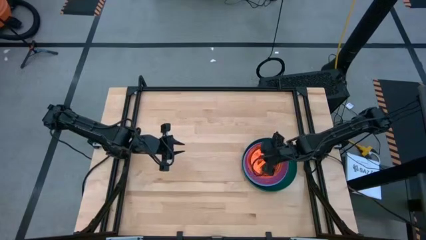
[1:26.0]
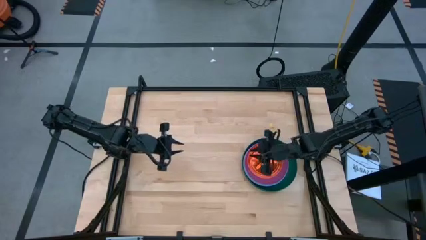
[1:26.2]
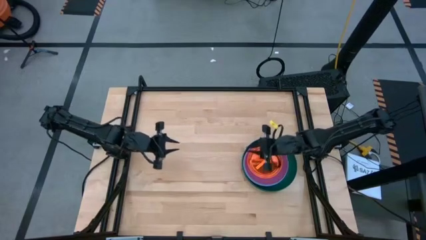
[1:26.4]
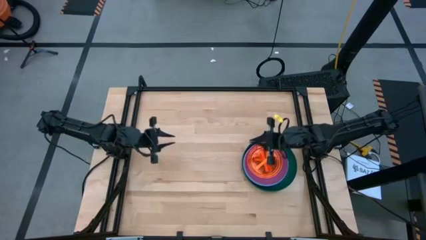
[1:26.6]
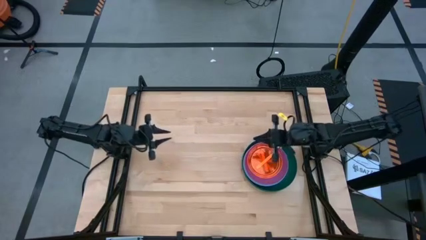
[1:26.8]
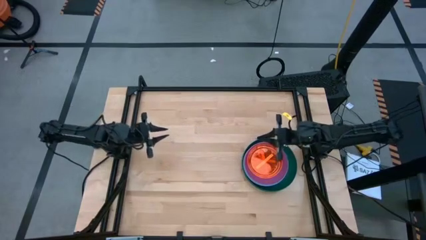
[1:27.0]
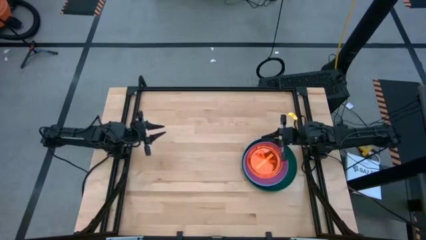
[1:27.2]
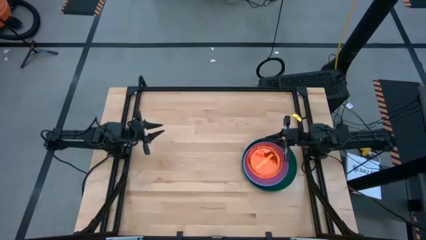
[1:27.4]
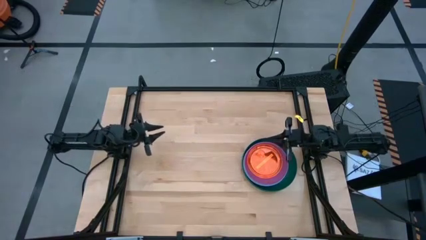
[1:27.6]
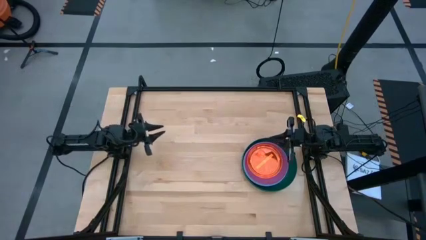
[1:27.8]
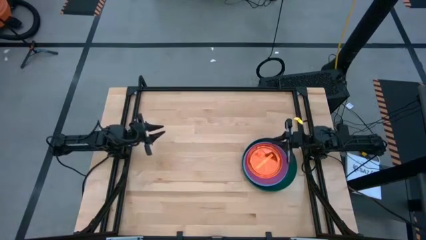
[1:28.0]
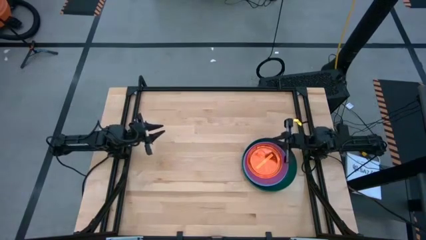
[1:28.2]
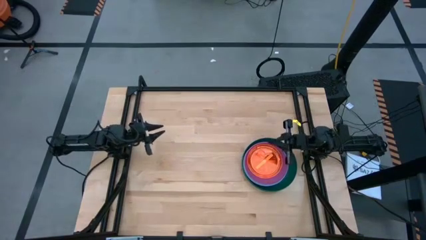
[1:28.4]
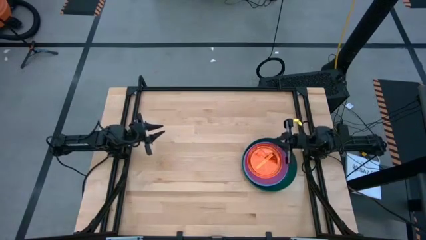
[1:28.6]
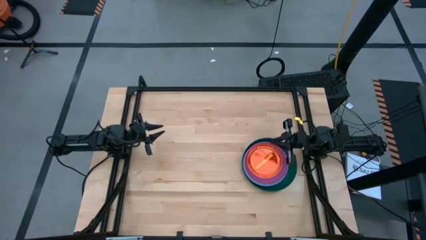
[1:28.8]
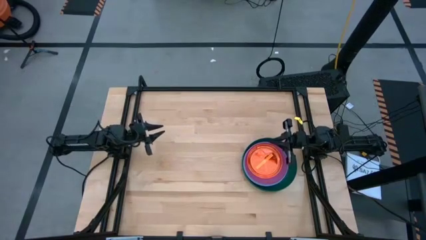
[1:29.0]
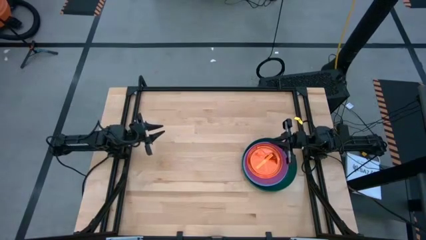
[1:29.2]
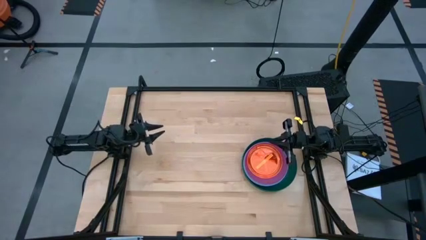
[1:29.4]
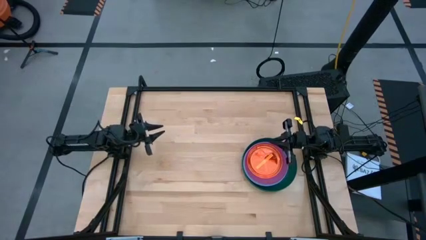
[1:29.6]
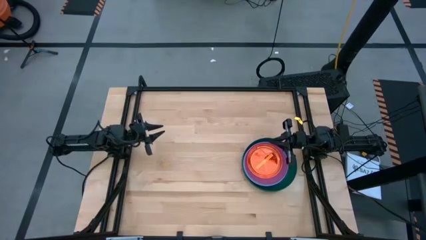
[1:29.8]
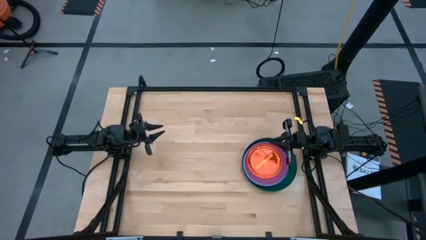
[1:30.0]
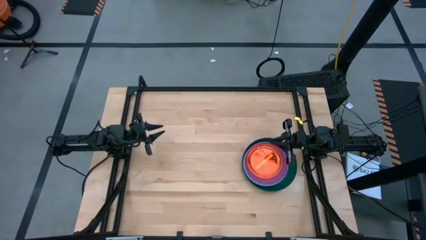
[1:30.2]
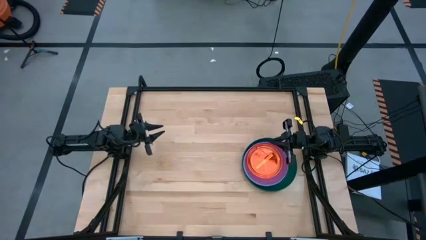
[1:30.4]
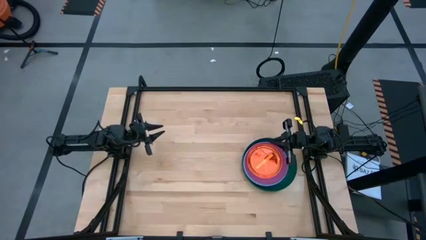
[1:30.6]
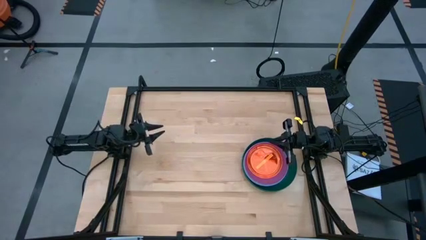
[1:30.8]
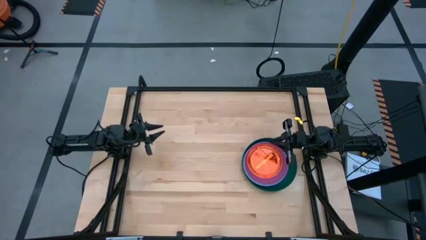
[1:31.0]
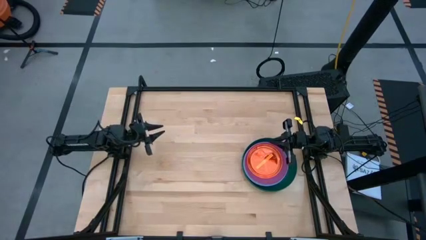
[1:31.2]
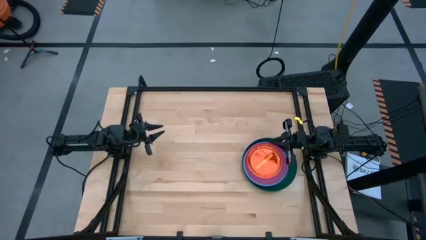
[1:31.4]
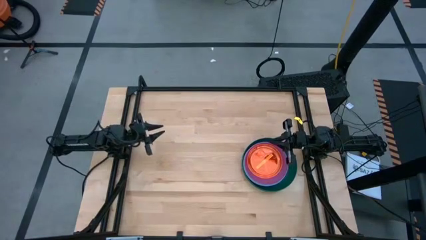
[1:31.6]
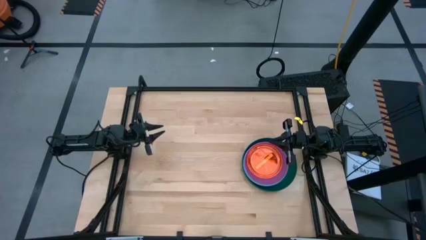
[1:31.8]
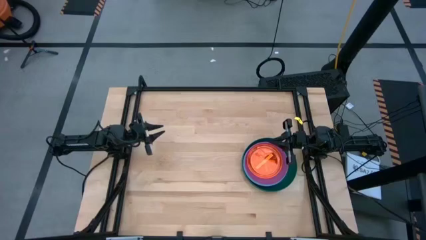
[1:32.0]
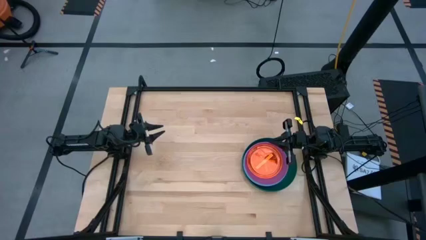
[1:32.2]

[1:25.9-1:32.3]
Task: Stack plastic plates
Return to Home Position

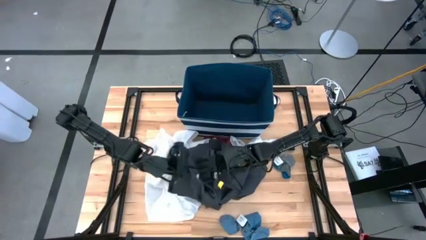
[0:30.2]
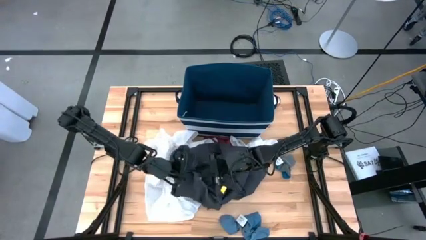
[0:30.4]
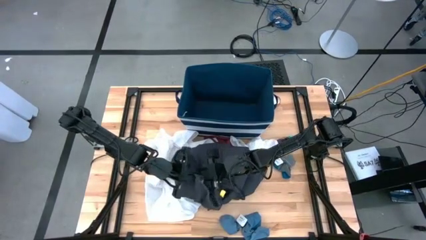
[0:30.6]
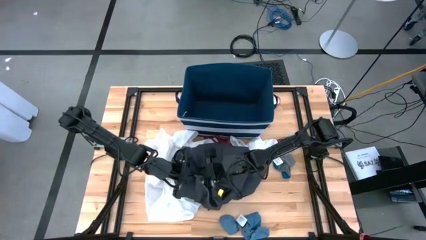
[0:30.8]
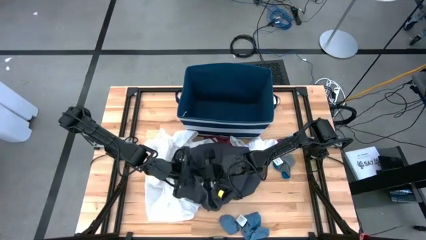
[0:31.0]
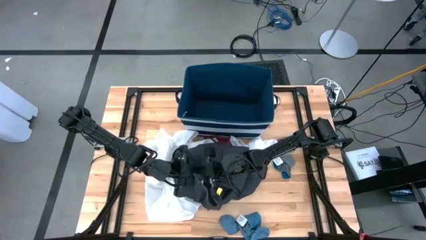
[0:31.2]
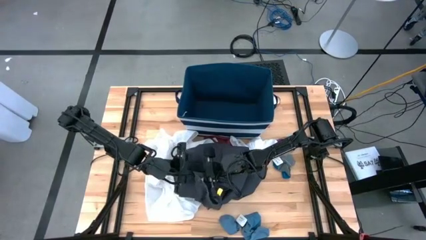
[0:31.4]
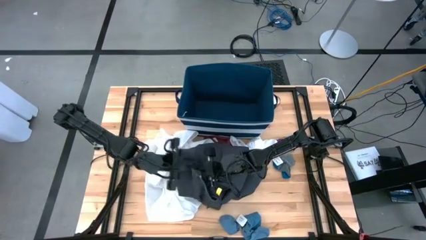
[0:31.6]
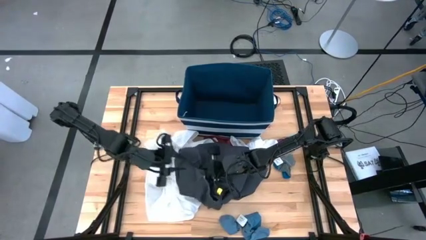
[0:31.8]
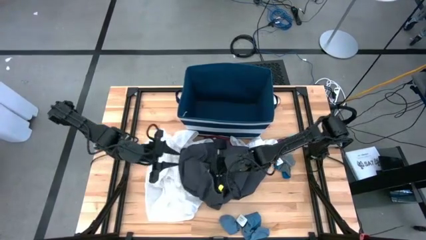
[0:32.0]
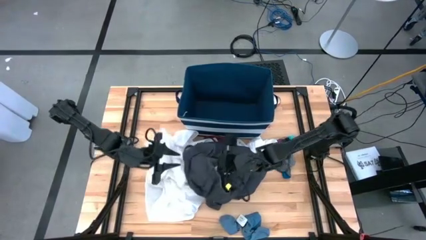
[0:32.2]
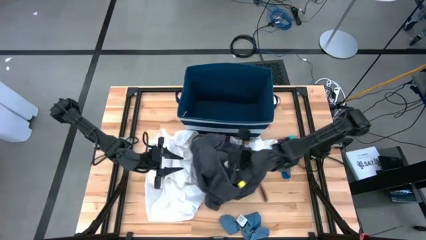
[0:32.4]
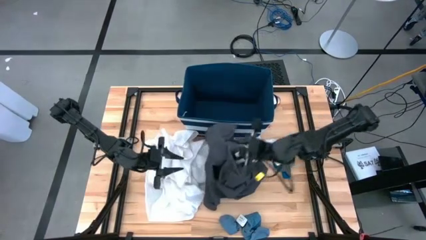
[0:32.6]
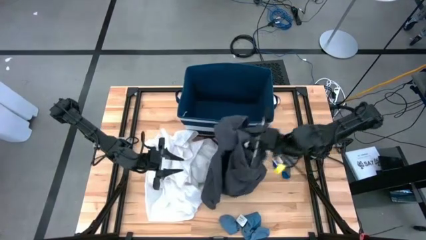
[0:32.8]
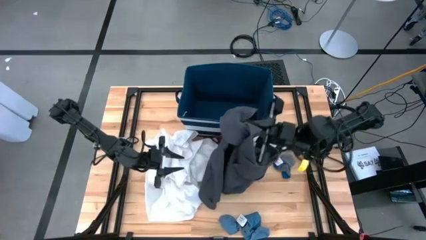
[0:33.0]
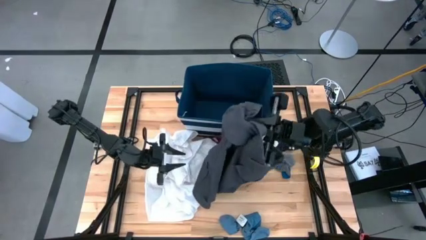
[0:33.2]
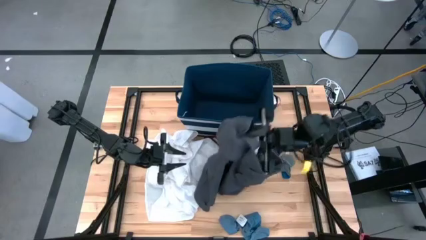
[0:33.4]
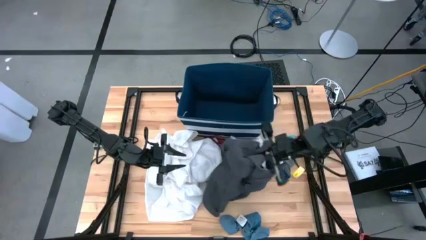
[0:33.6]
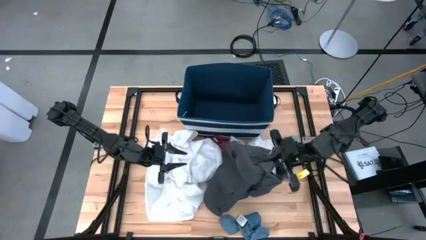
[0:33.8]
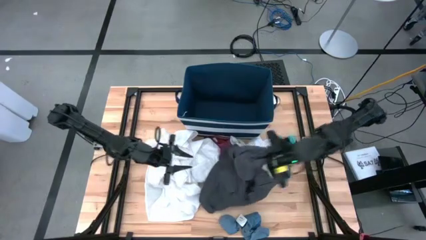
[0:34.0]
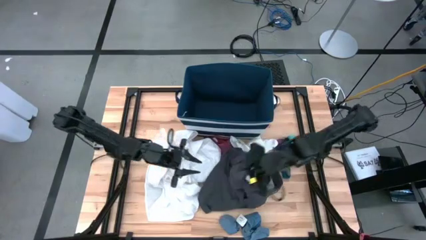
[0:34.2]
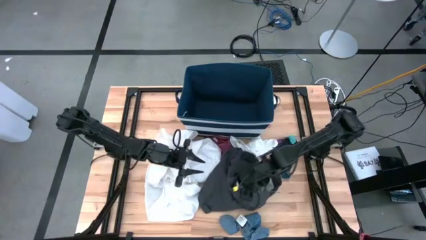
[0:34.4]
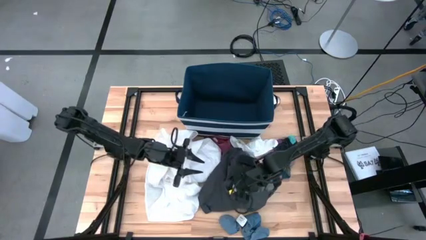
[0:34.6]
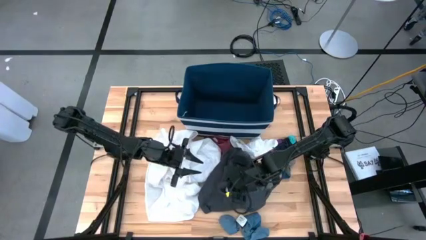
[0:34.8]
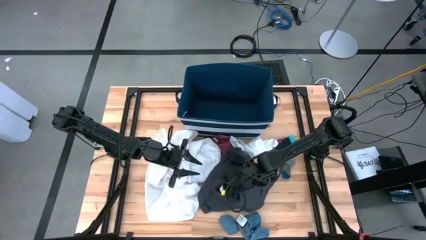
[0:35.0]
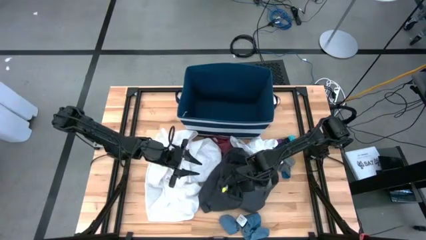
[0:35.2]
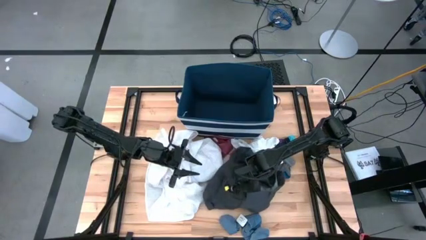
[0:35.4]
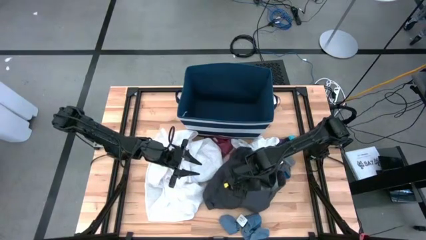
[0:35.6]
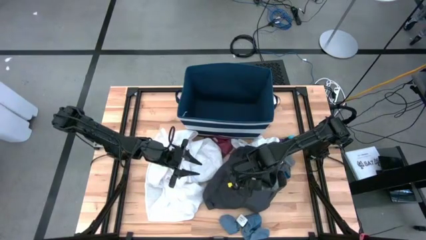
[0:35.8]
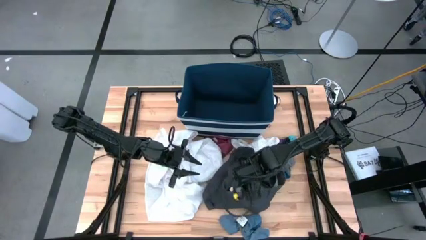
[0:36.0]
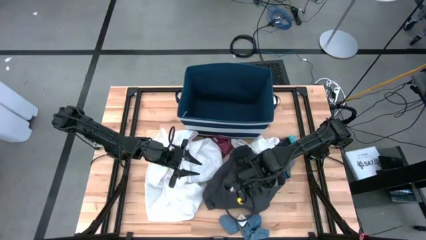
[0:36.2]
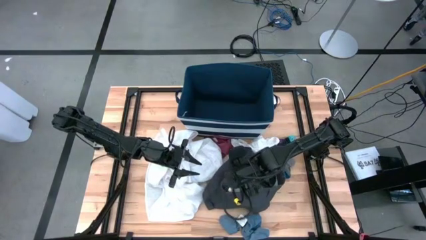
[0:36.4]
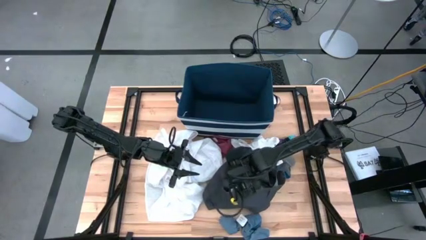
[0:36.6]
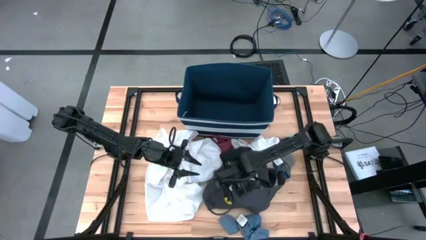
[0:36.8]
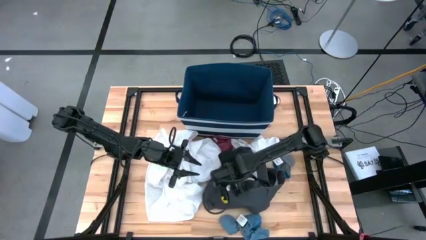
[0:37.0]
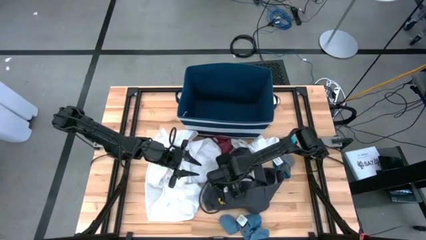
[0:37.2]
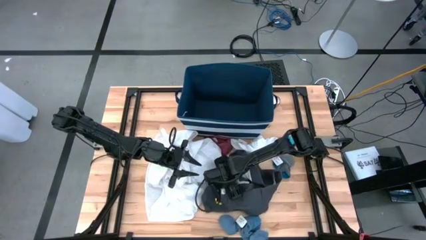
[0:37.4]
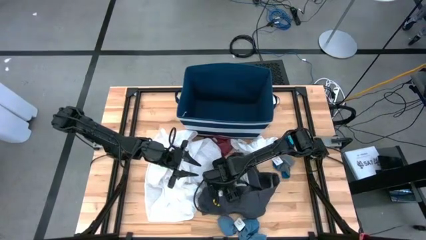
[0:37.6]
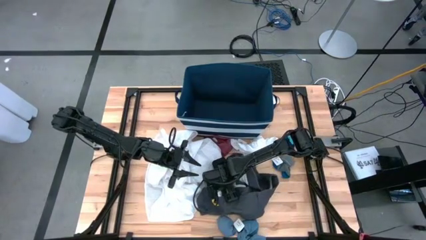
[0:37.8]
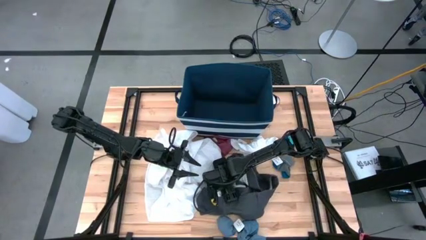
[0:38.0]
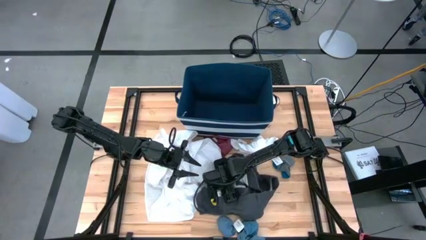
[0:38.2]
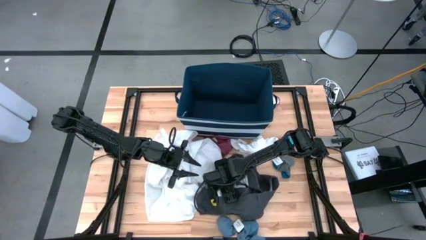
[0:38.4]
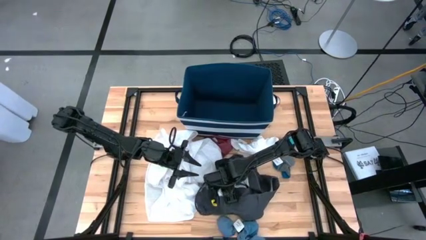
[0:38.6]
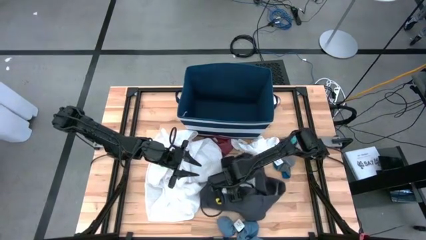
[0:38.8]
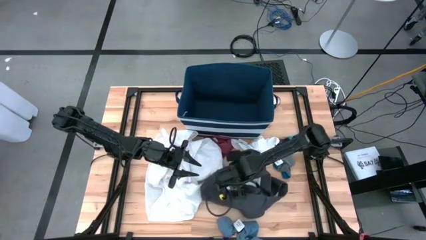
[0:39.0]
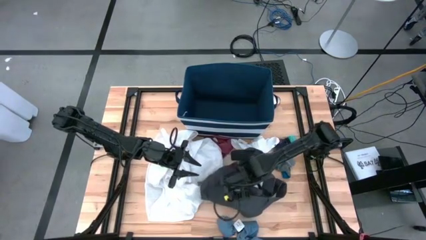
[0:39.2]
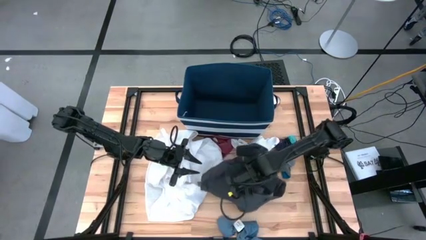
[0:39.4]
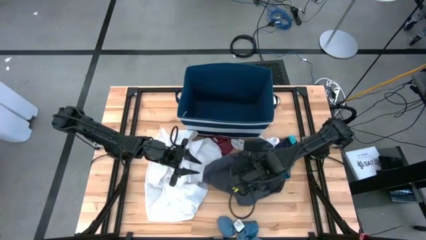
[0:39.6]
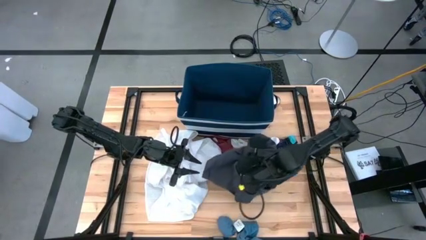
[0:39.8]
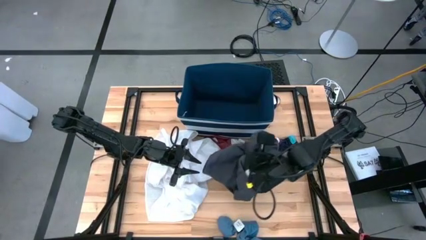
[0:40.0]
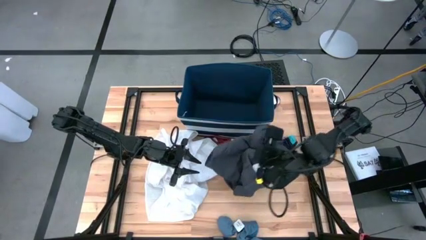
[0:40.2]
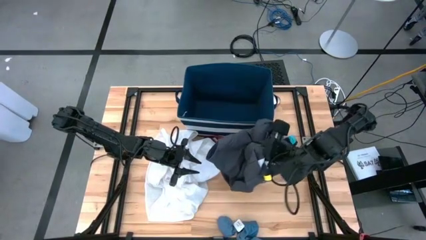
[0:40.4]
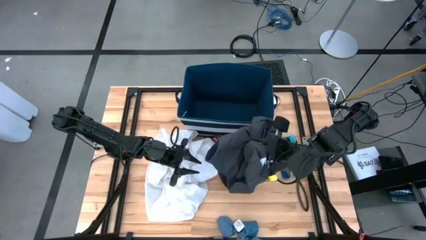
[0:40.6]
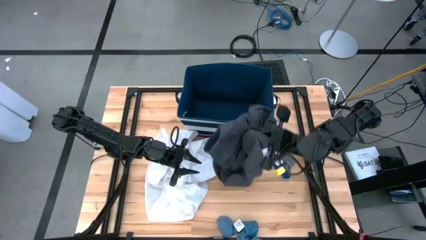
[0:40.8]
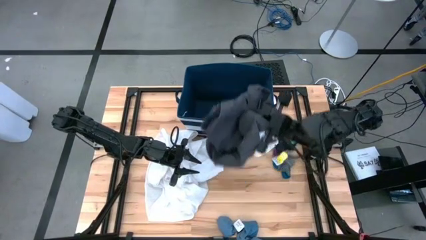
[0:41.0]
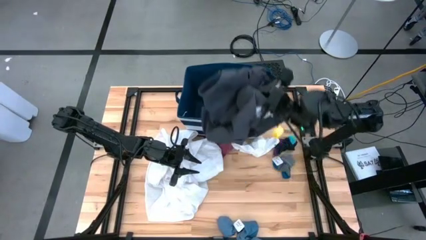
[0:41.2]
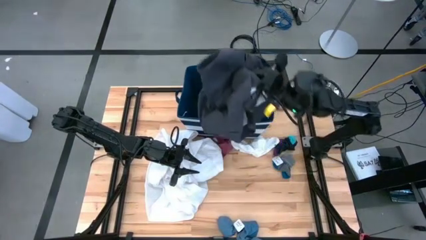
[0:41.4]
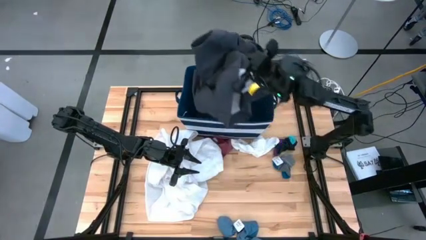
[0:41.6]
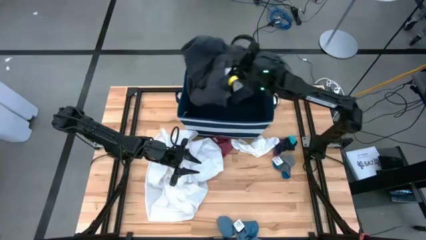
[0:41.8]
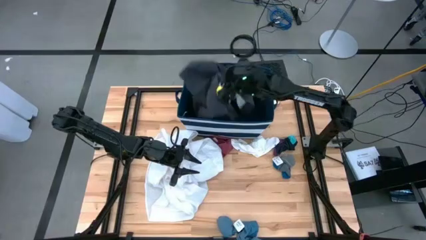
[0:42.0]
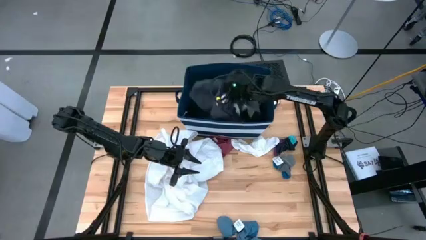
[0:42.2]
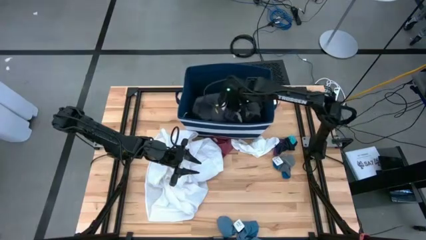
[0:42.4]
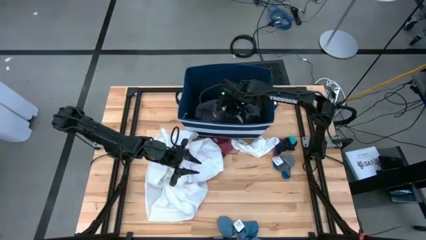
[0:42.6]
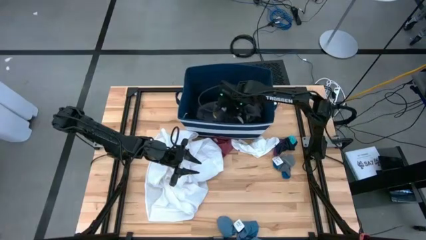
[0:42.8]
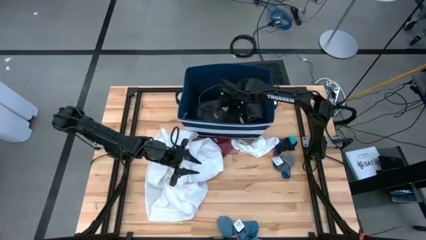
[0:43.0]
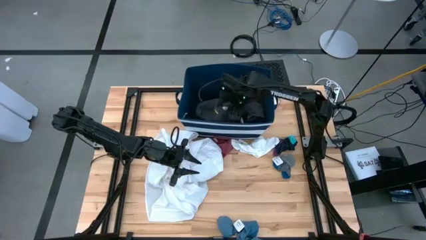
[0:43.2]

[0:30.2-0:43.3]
Task: Sort clothes
Put the black shorts into the blue laundry organizer
